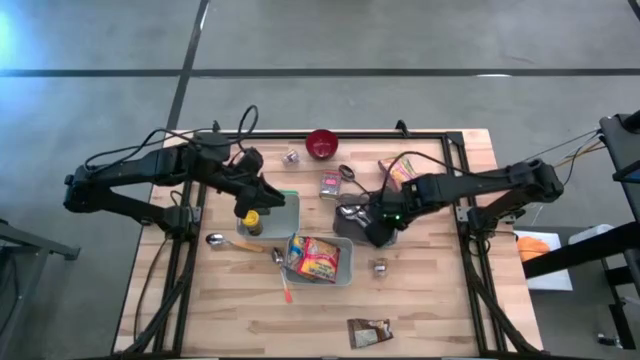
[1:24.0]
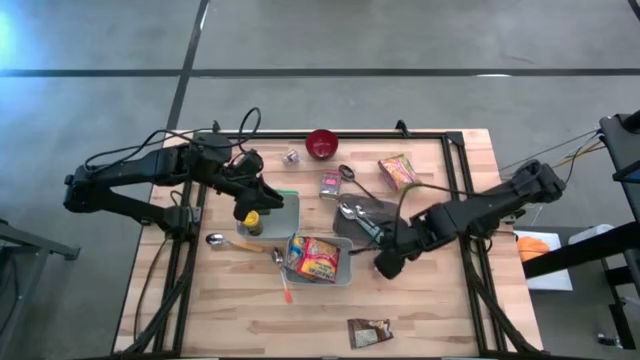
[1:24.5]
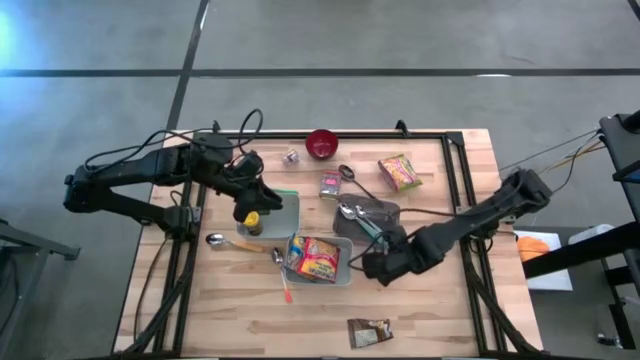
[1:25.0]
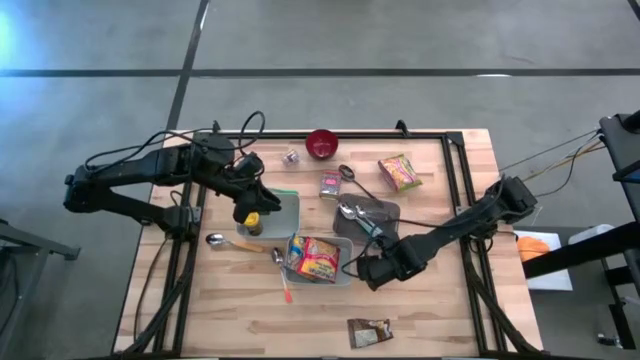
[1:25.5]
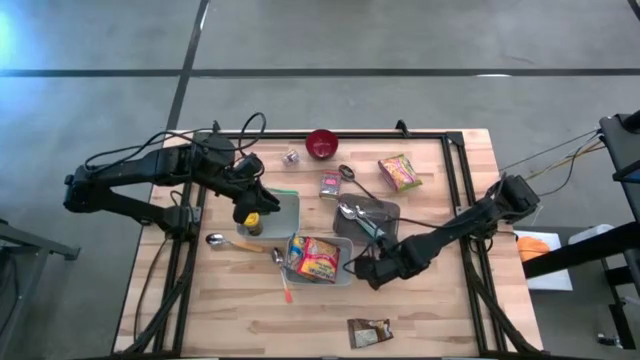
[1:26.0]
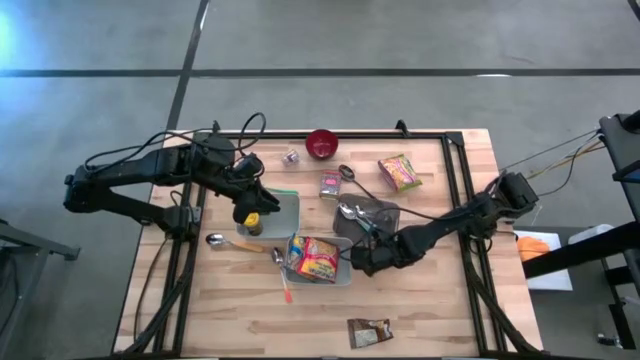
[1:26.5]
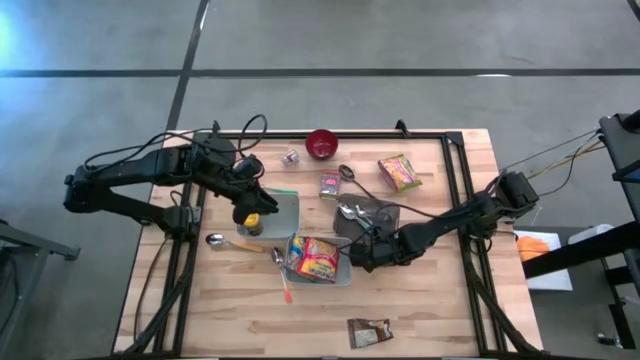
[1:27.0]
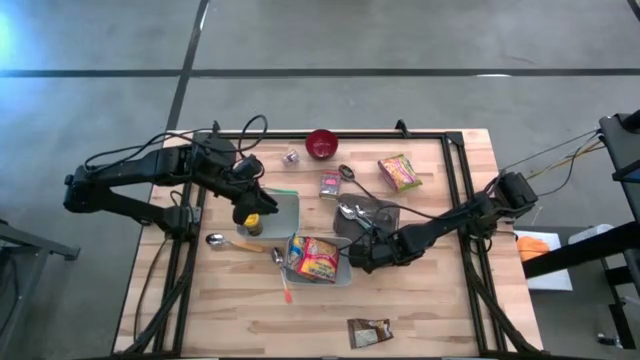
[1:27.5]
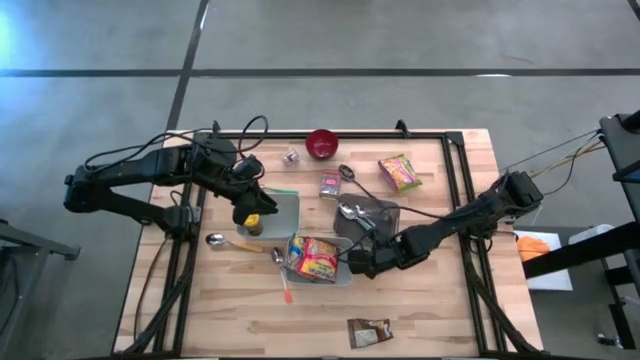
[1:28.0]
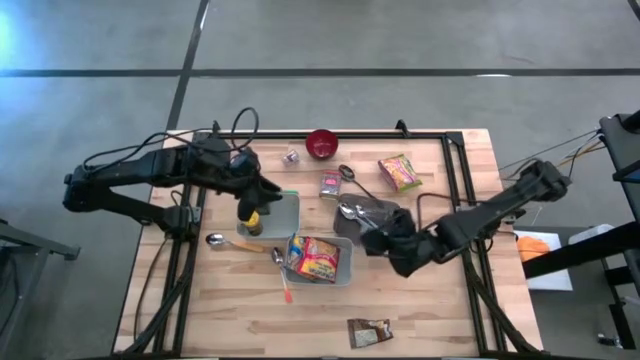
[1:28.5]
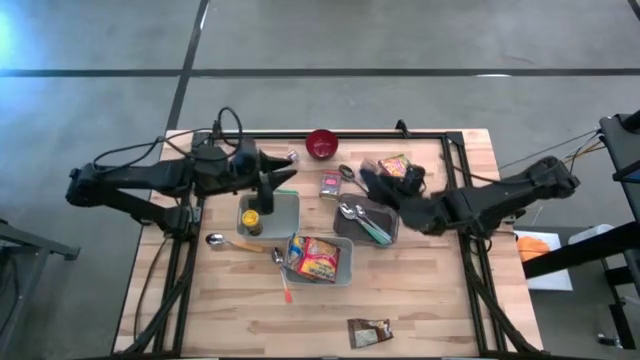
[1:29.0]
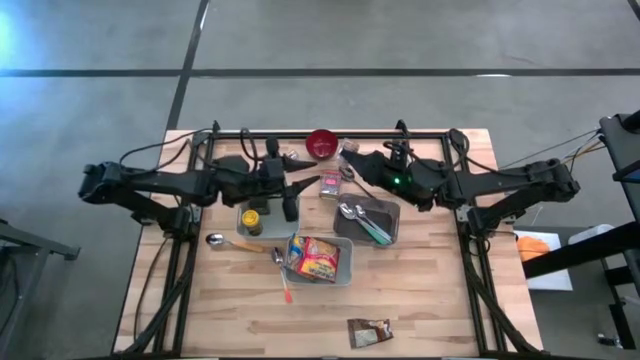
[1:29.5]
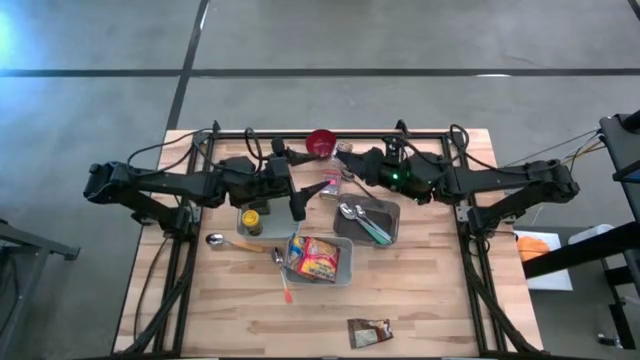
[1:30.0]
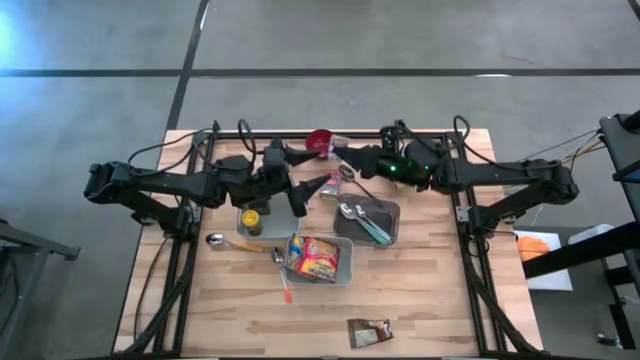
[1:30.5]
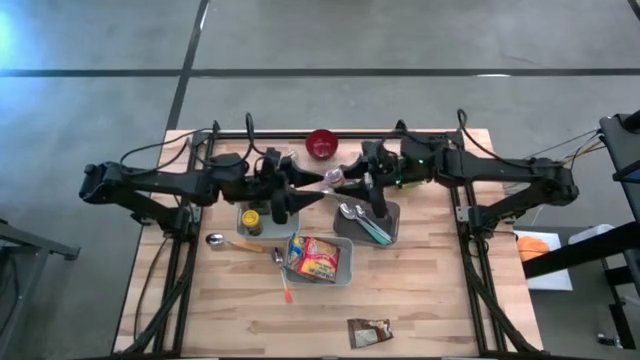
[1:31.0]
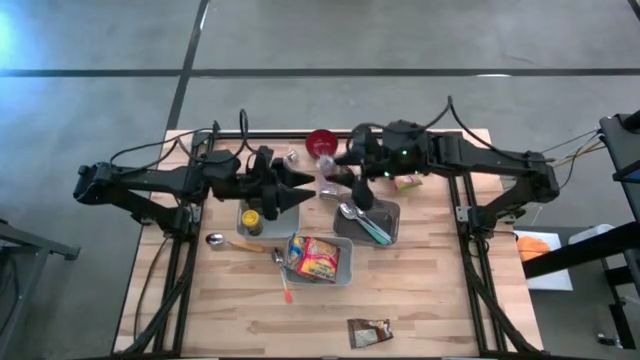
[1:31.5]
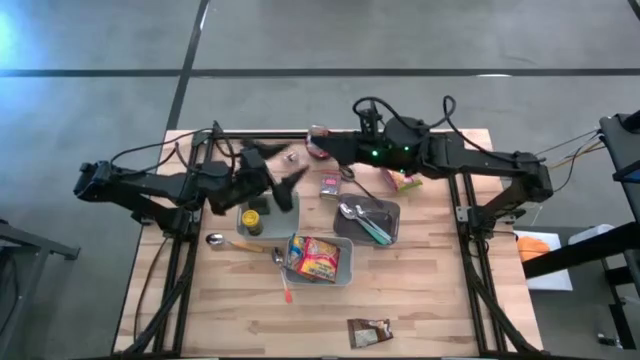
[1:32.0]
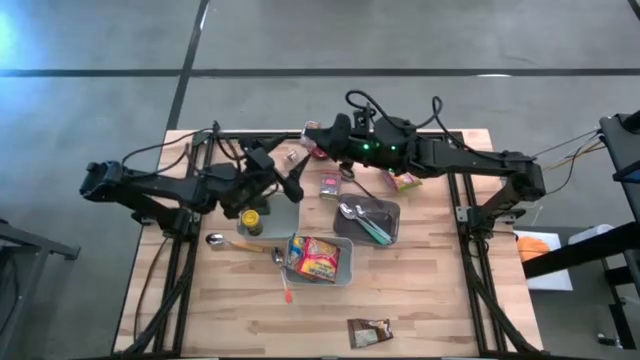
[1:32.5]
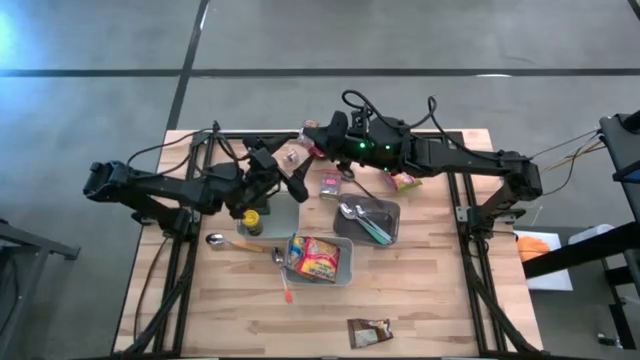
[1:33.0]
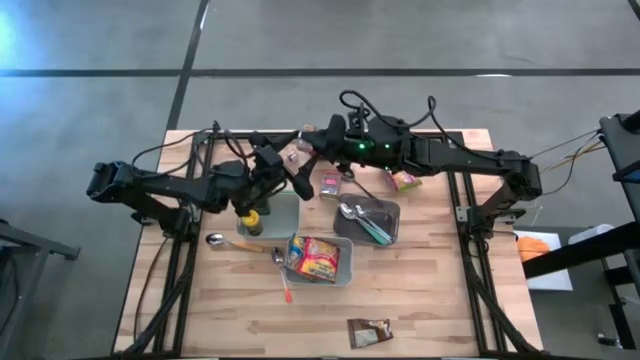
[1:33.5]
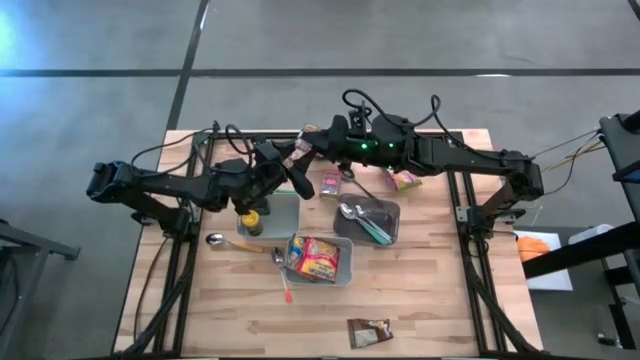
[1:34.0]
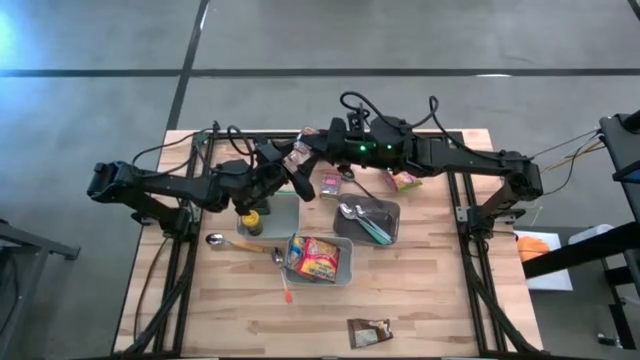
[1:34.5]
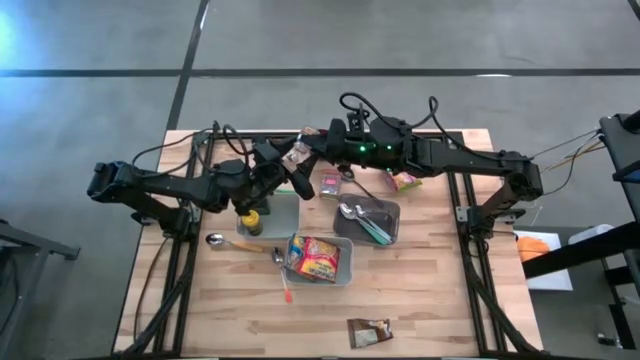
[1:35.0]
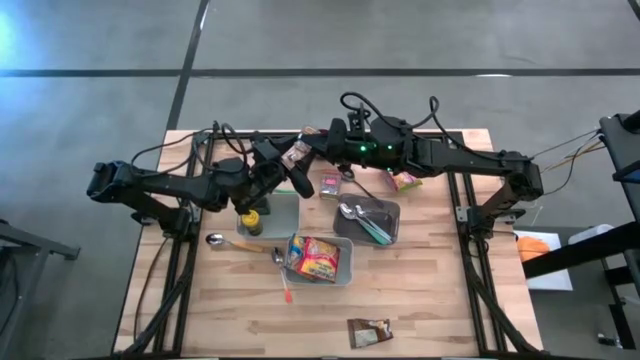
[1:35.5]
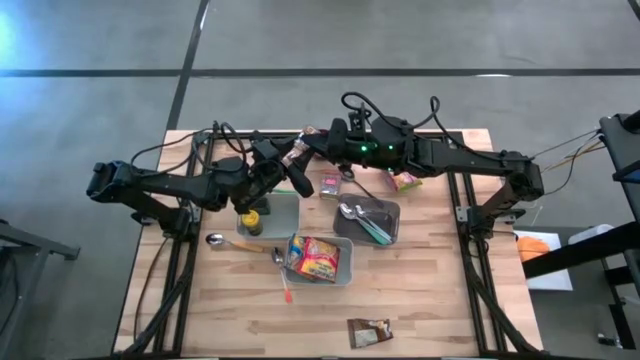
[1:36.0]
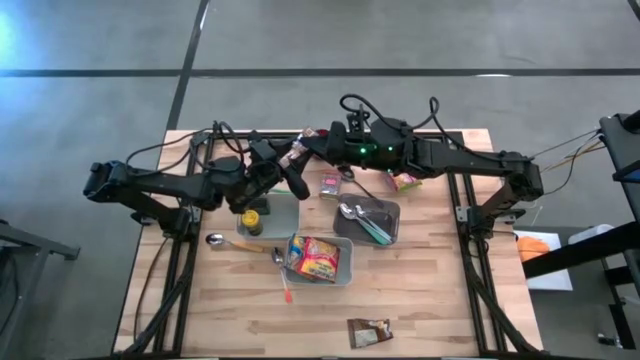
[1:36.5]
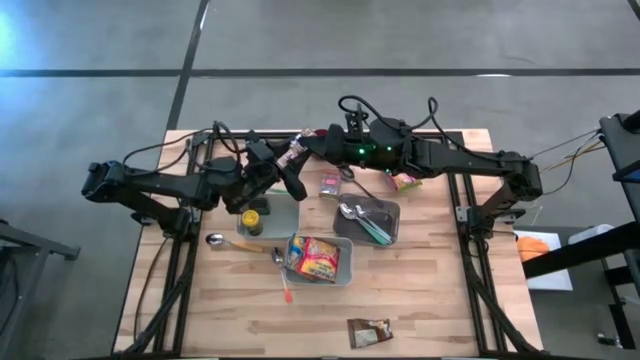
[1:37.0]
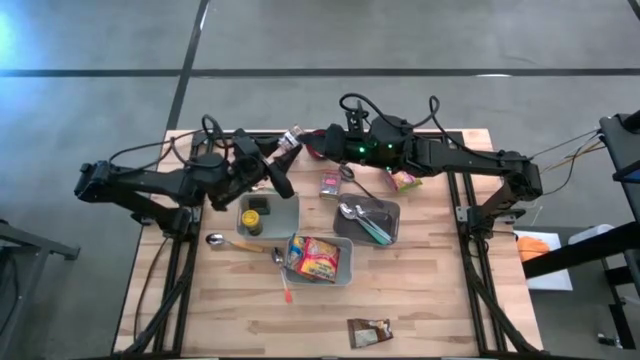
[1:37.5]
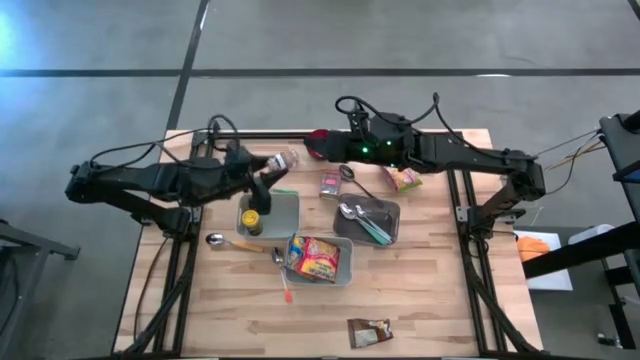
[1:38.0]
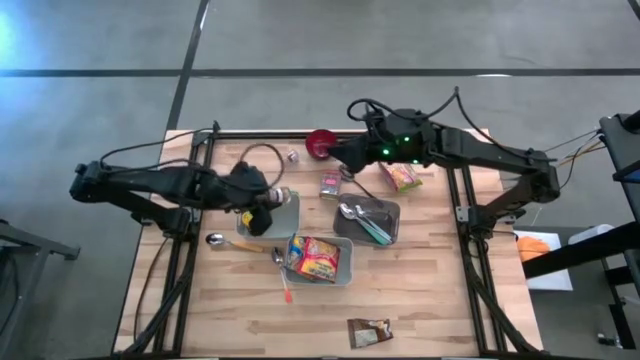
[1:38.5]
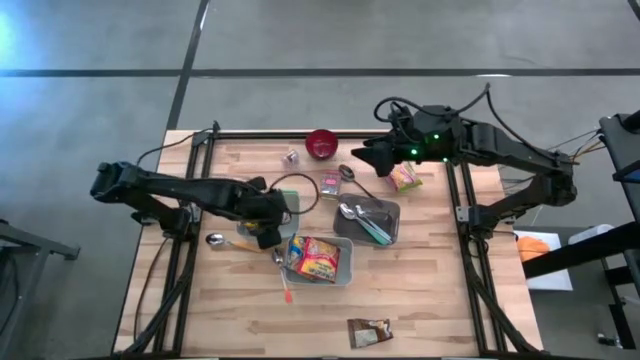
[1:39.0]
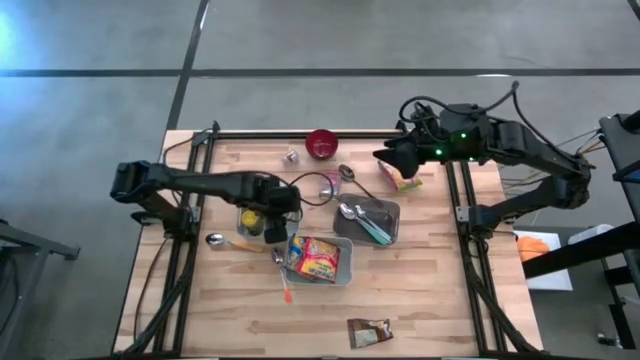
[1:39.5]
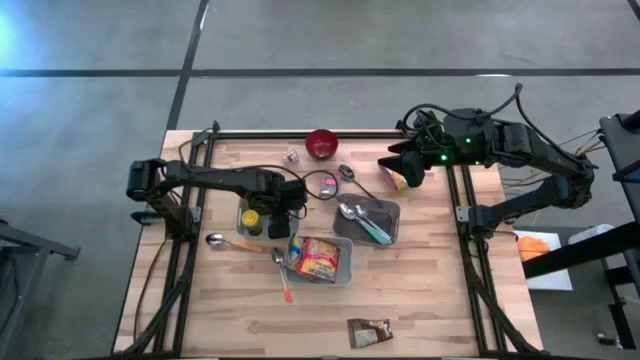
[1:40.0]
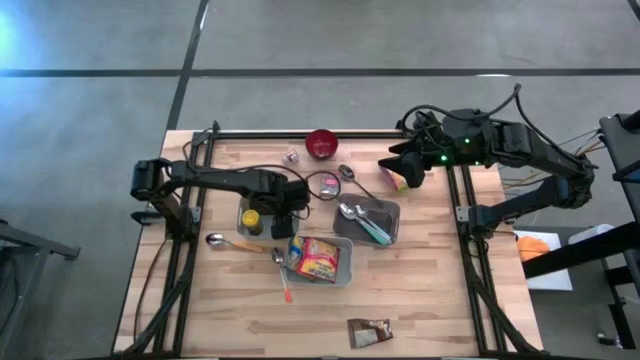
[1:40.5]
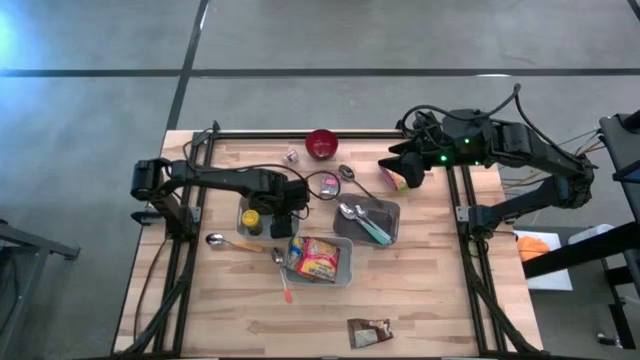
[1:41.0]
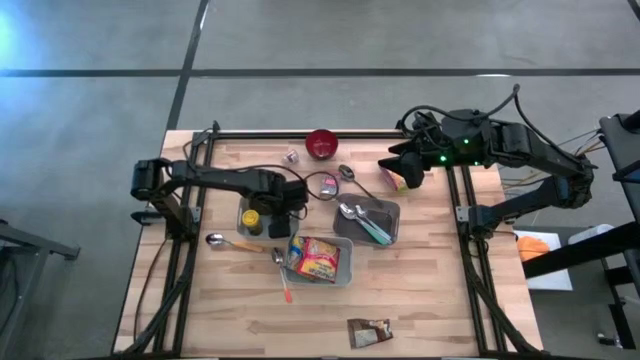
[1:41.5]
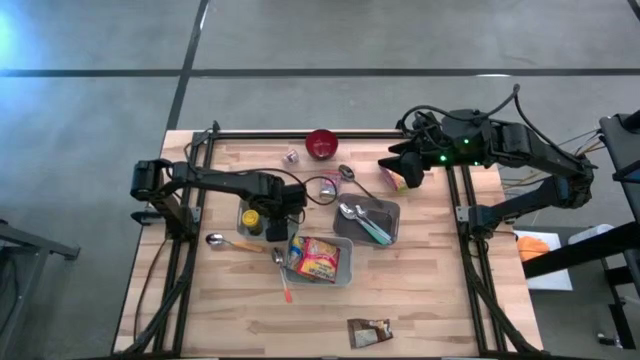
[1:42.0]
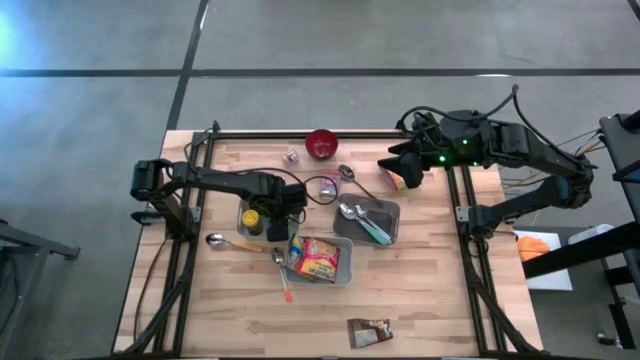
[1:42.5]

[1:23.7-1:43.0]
Put the bottom brown seasoning bottle into the top gray bin
